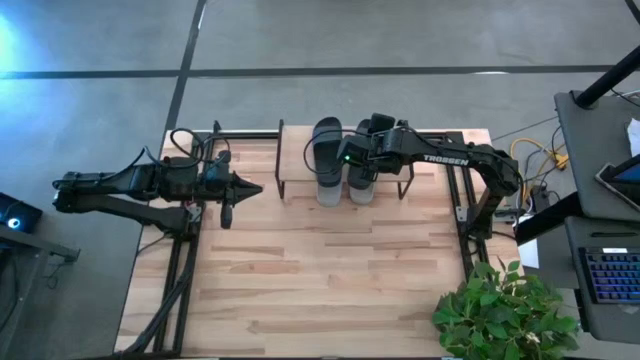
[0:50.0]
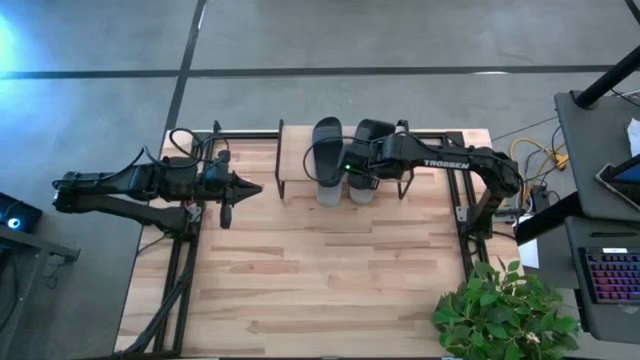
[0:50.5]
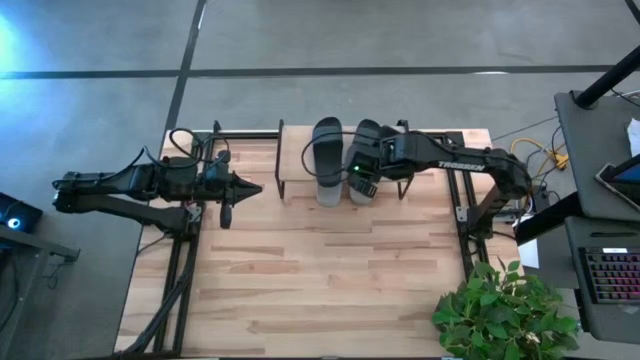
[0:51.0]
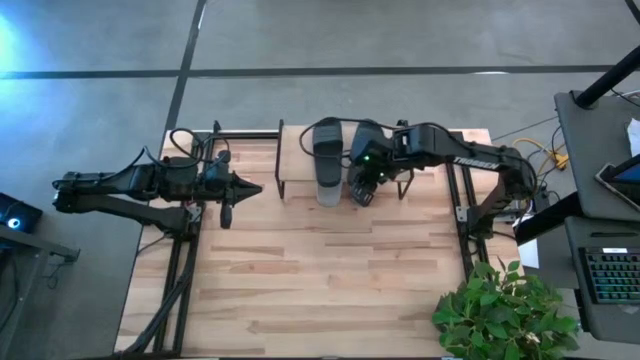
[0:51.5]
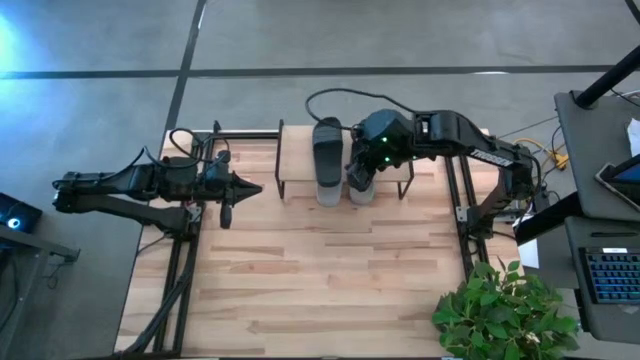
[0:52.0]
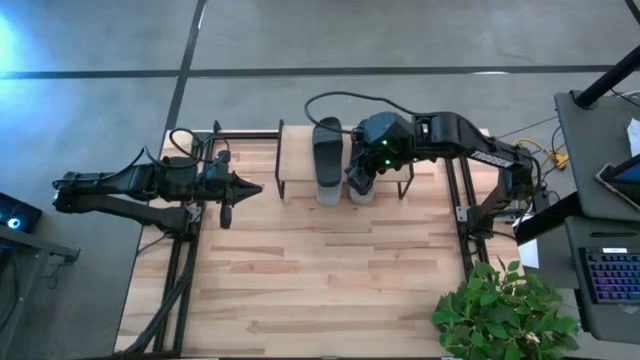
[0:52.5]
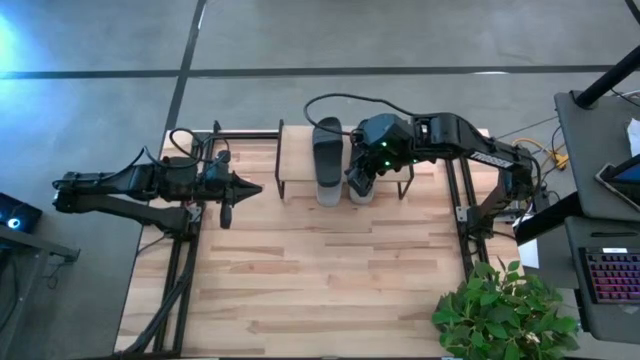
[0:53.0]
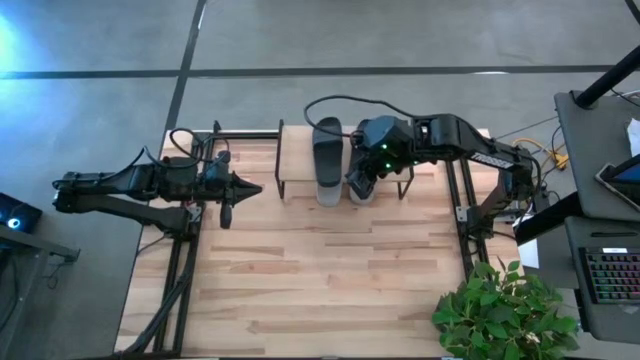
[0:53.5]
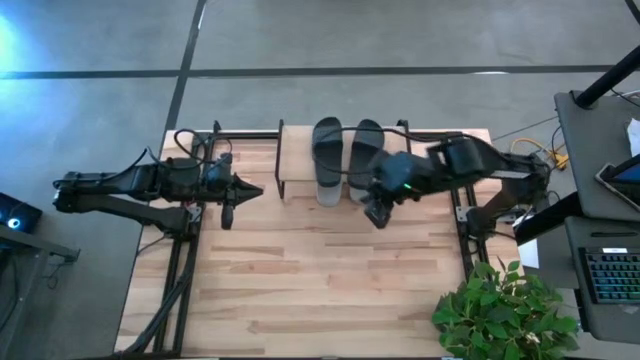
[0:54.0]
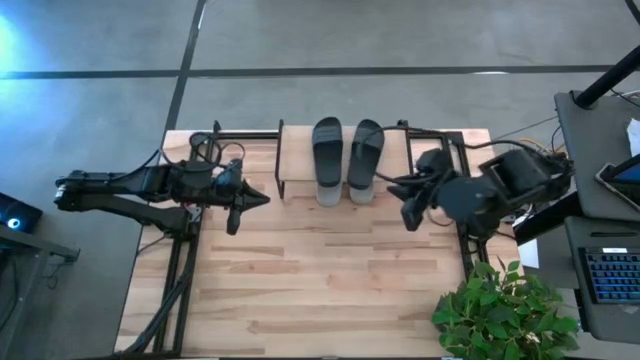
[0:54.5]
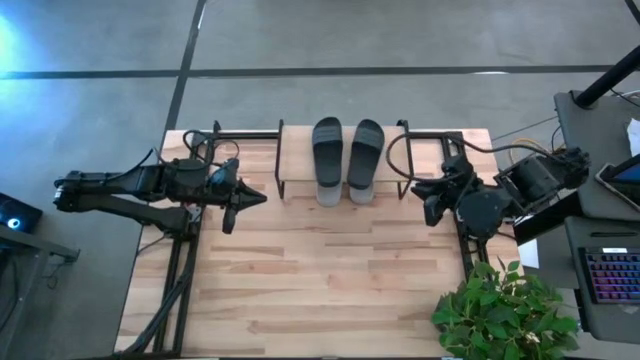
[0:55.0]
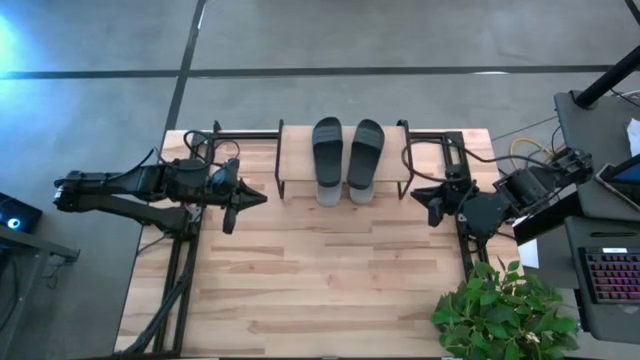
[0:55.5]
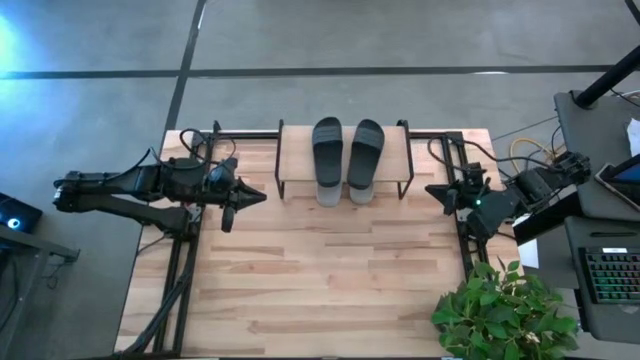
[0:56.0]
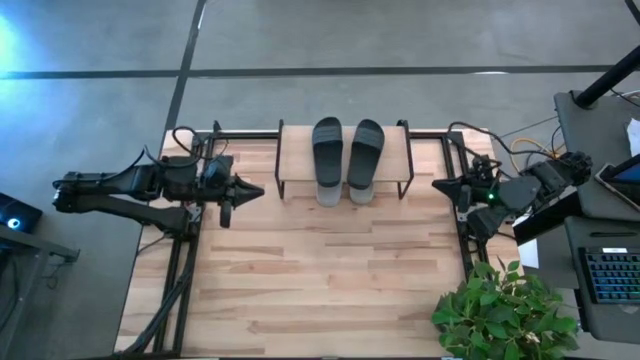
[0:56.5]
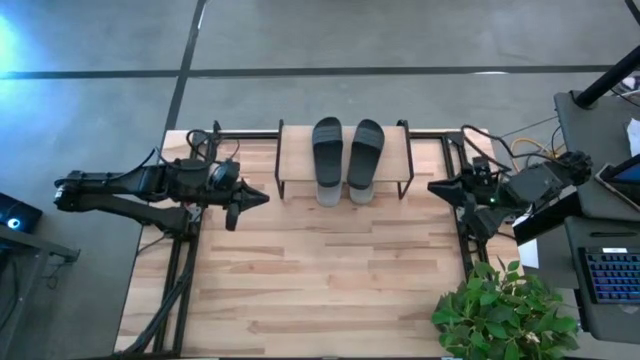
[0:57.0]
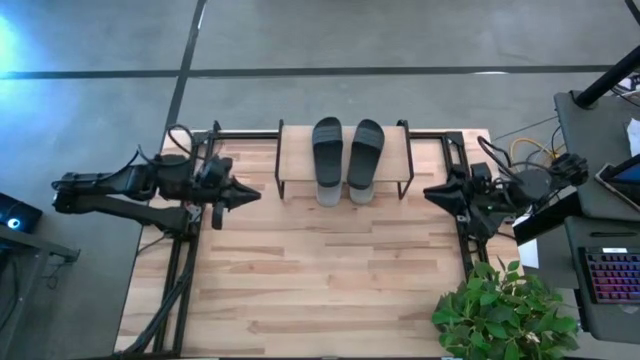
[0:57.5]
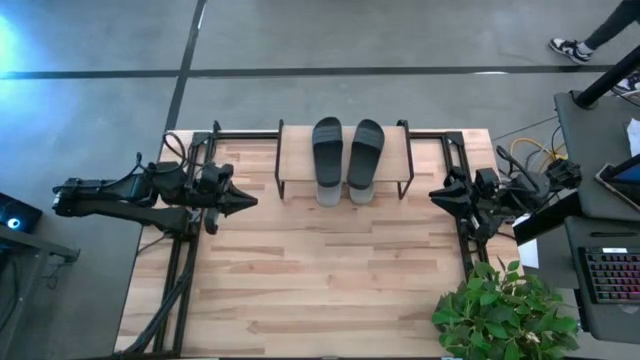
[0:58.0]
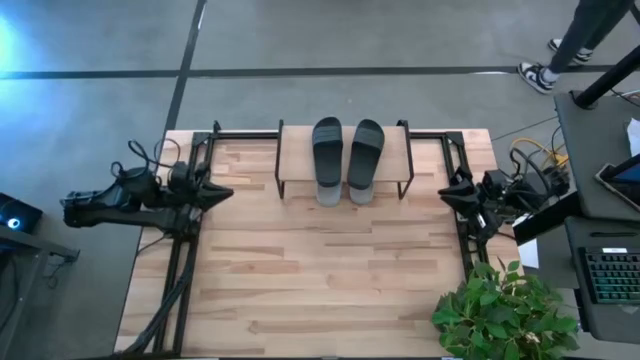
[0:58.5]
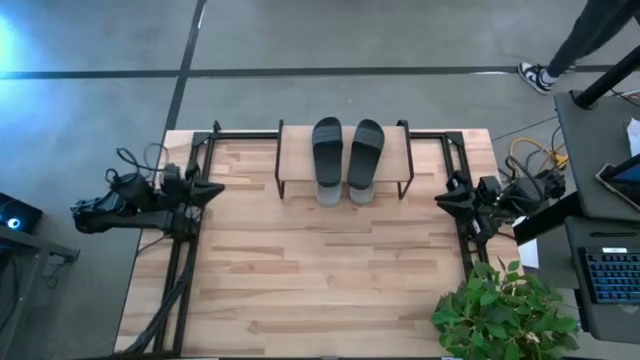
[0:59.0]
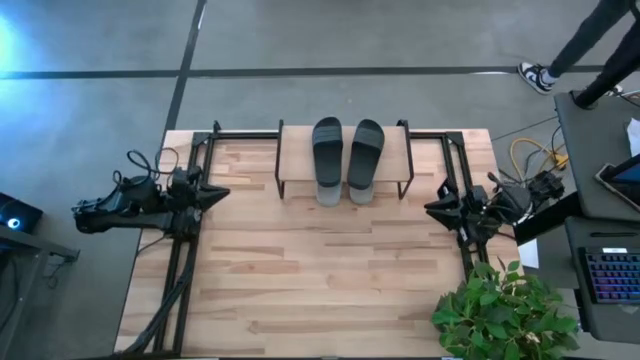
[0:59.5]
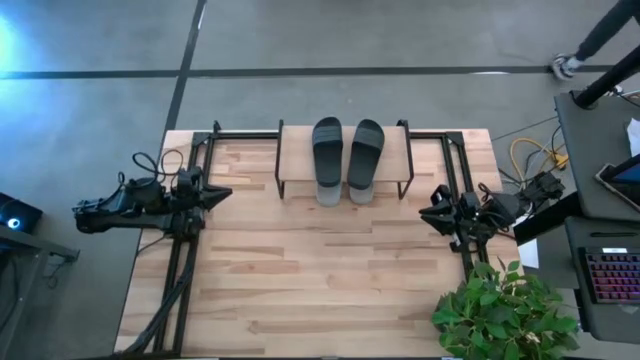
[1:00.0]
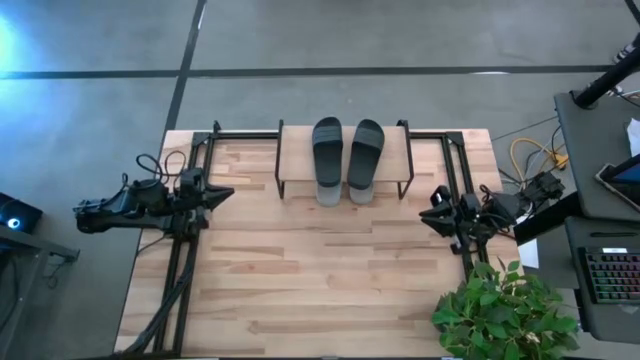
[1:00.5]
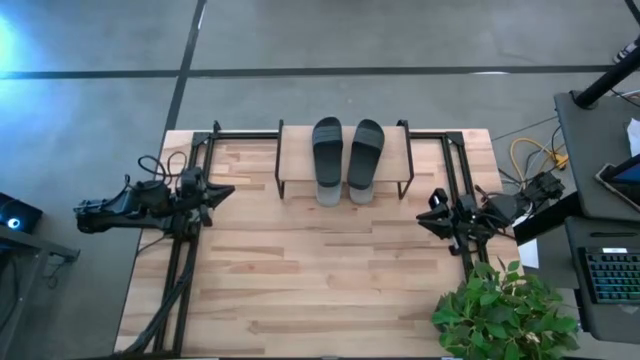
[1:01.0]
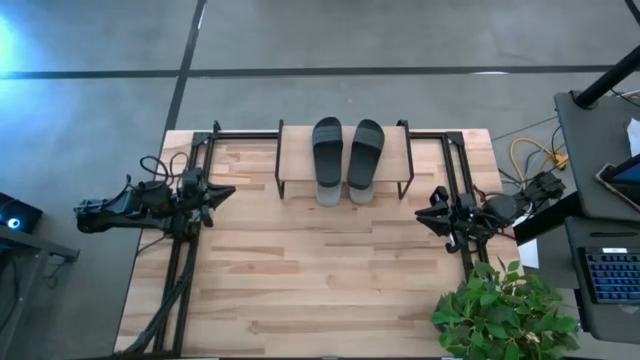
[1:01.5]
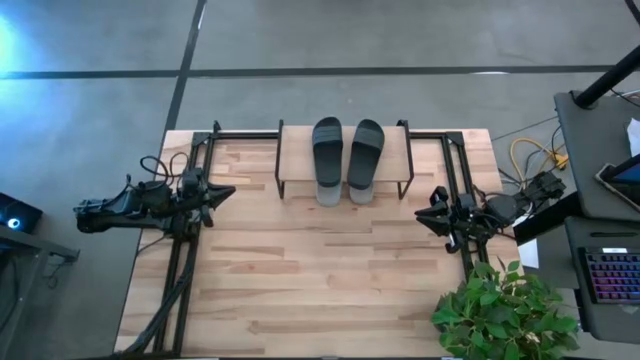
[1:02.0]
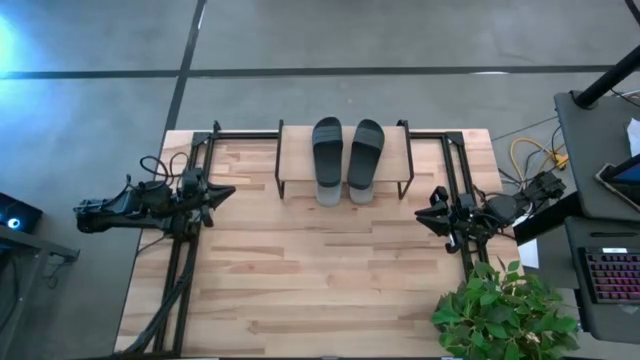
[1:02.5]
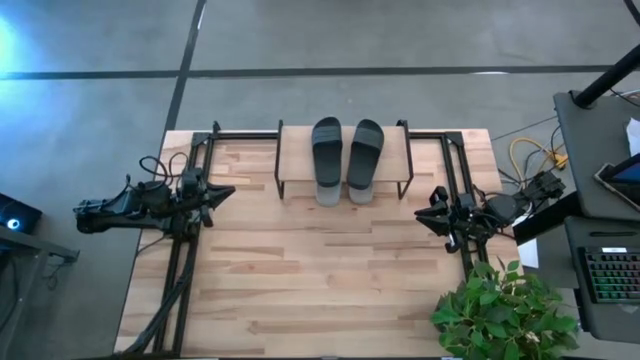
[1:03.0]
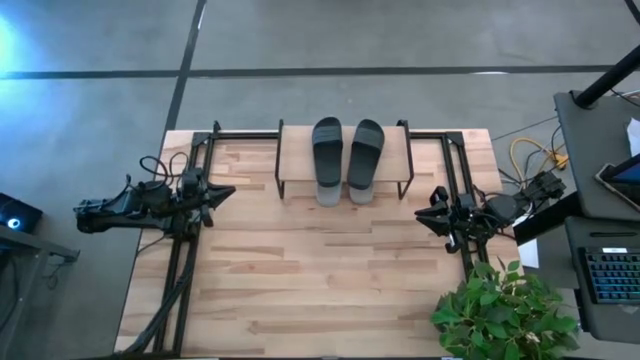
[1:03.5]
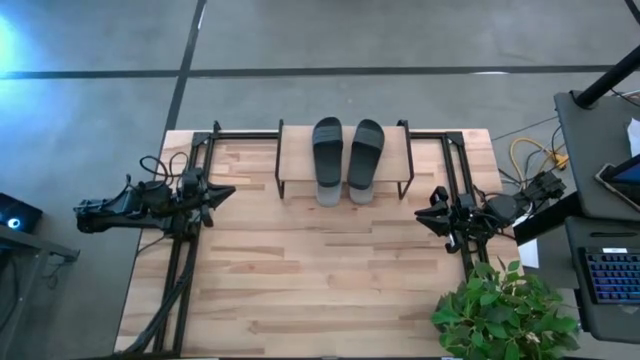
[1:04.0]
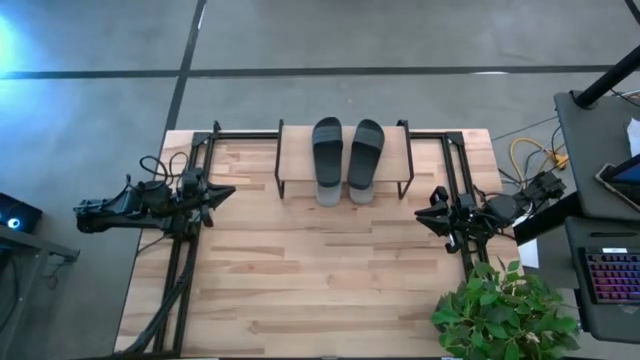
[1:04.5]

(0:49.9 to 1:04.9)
Task: Pick and place slides into the shelf
Return to Home Position

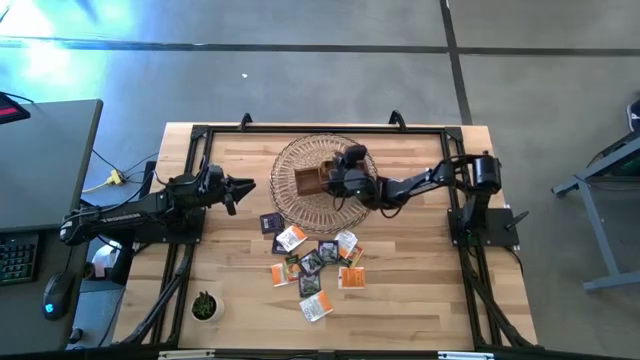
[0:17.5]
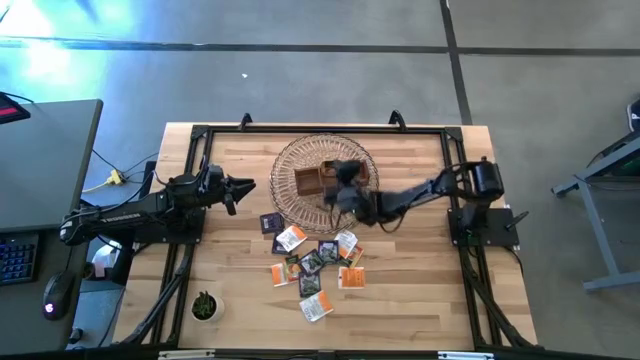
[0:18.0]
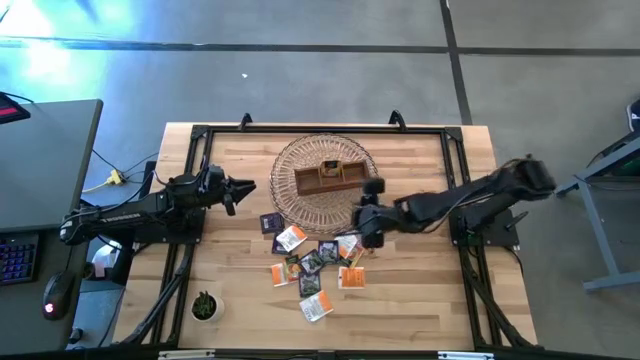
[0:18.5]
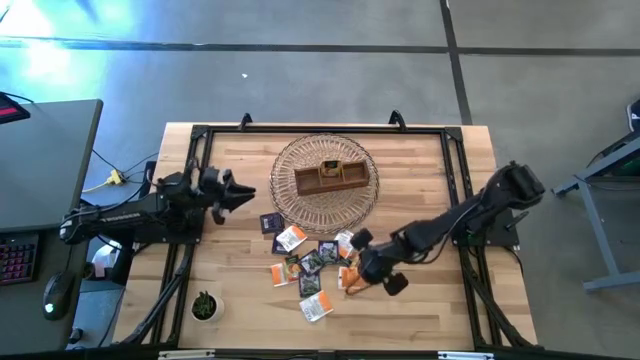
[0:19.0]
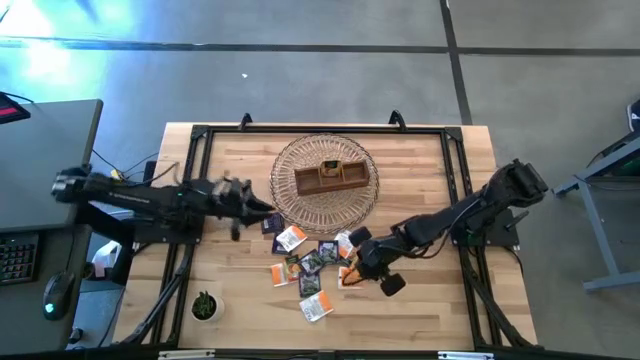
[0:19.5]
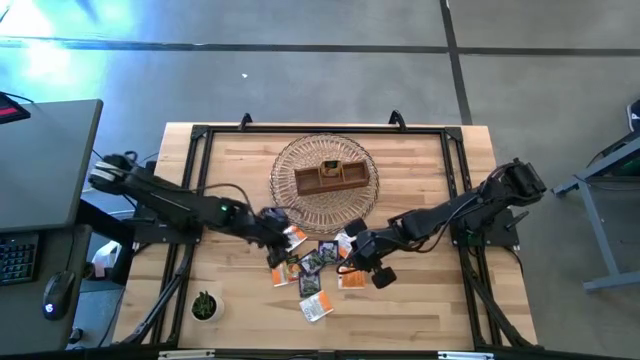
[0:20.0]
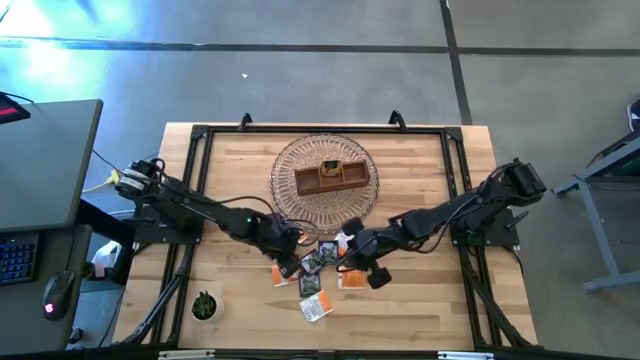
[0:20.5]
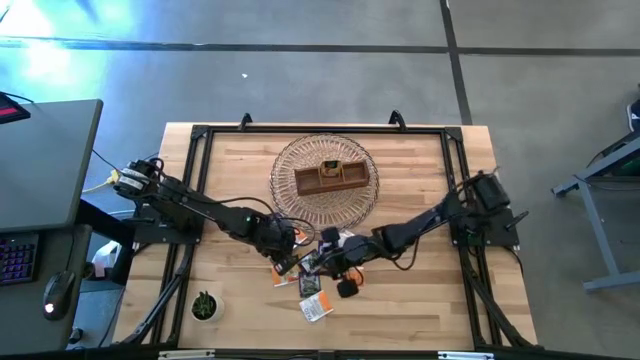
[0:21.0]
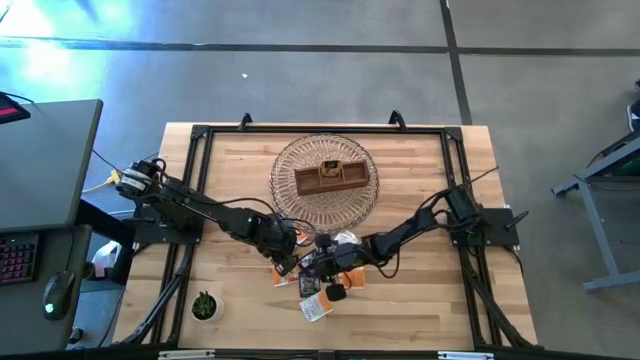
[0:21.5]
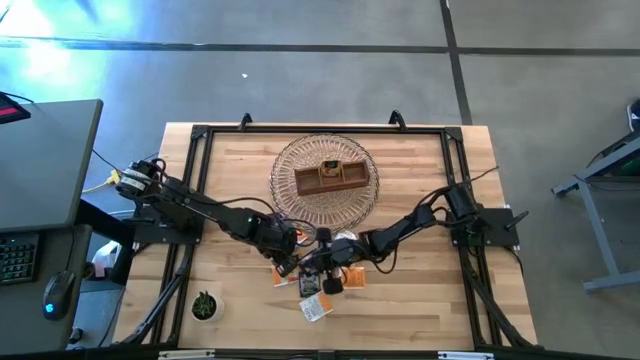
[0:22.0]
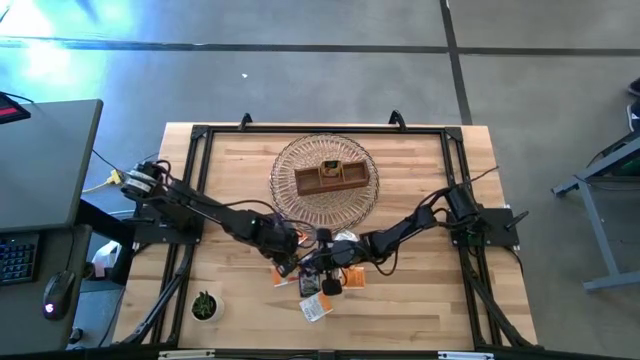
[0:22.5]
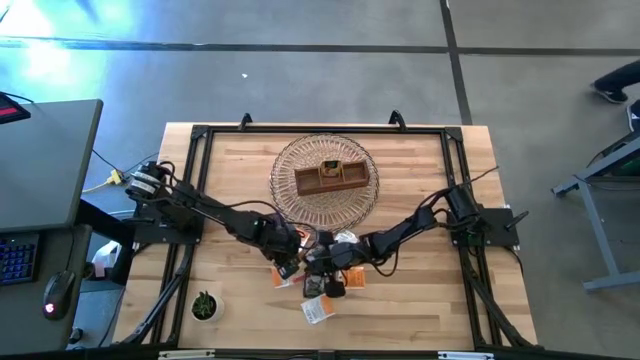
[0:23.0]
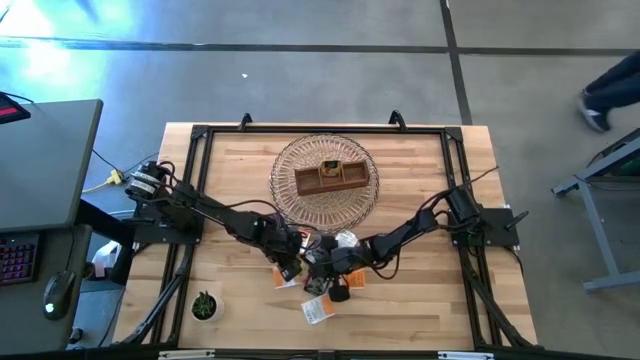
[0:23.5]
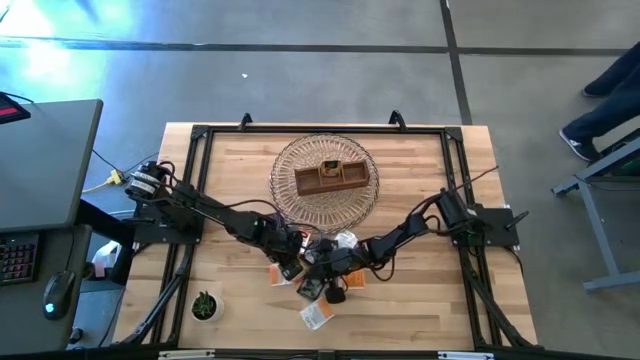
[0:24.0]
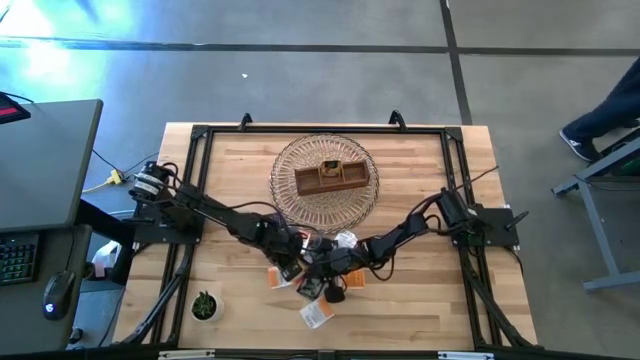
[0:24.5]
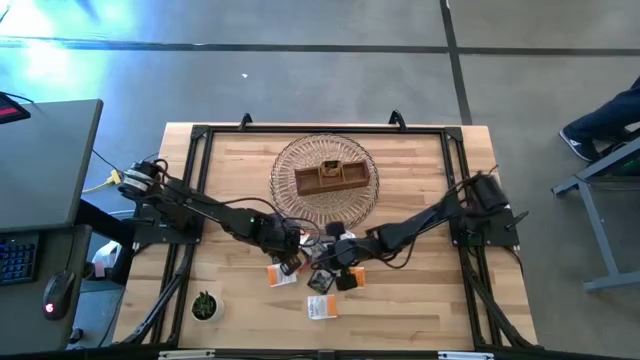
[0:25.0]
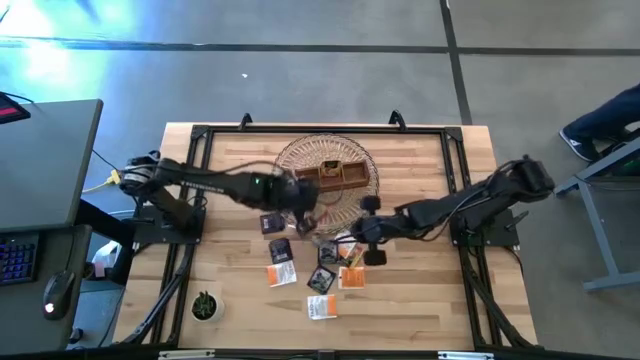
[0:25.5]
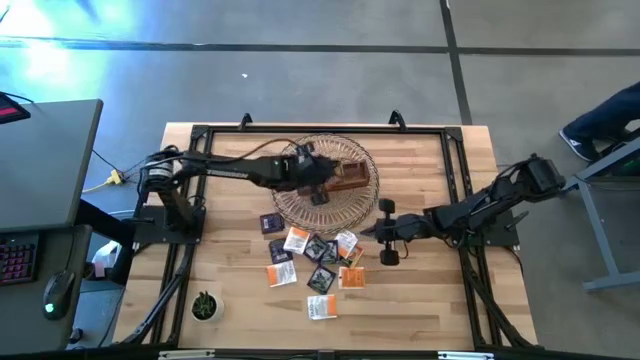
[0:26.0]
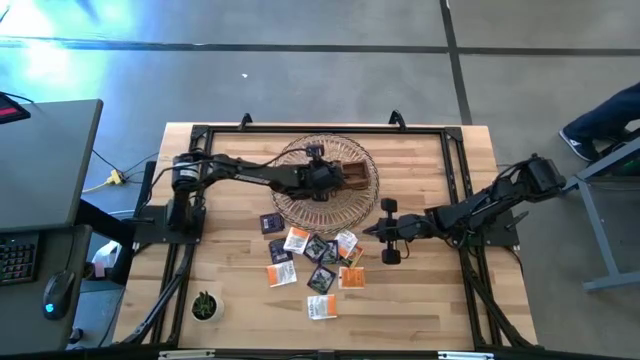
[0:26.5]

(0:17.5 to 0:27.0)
Task: Pick & Place Tea
Put the orange tea bag into the middle section of the wooden organizer
